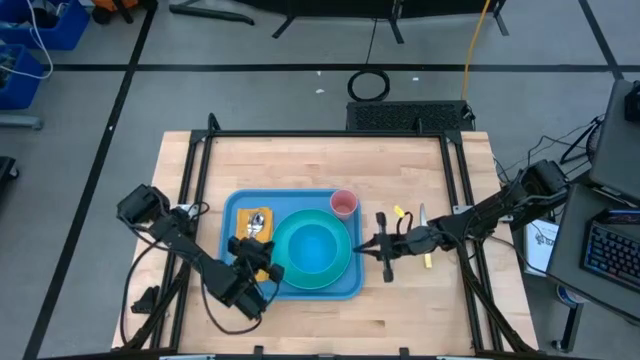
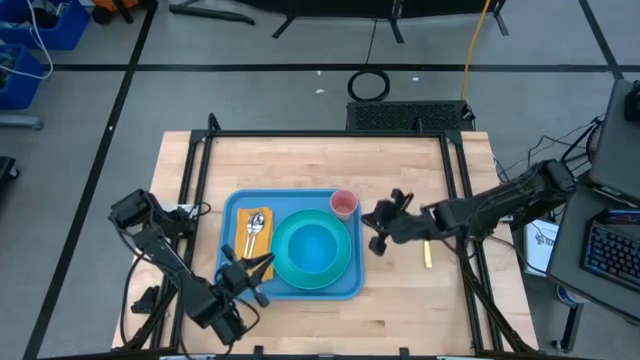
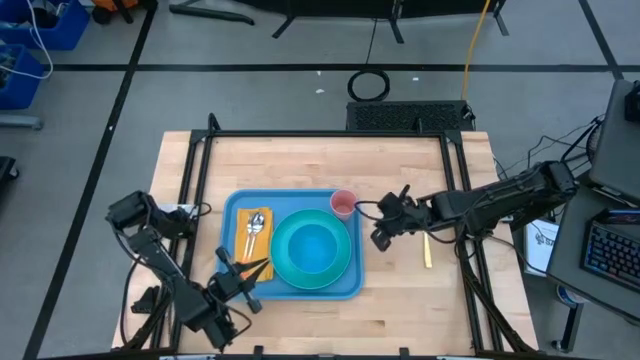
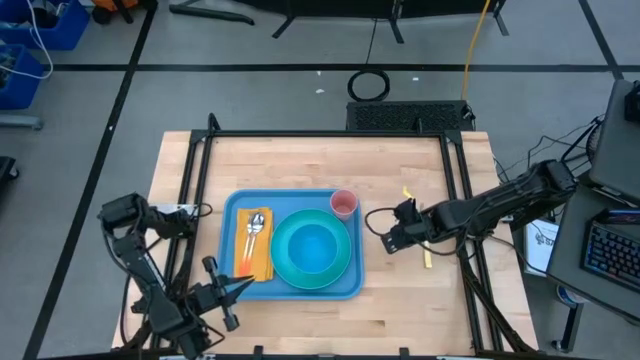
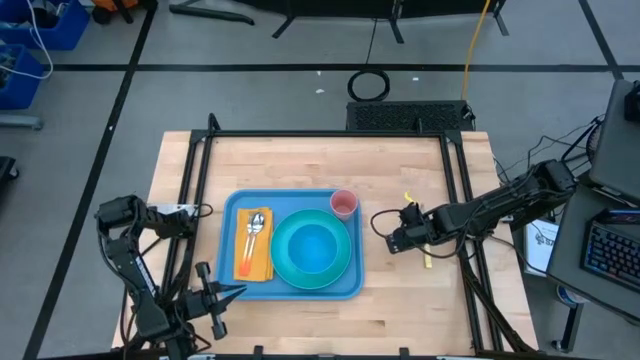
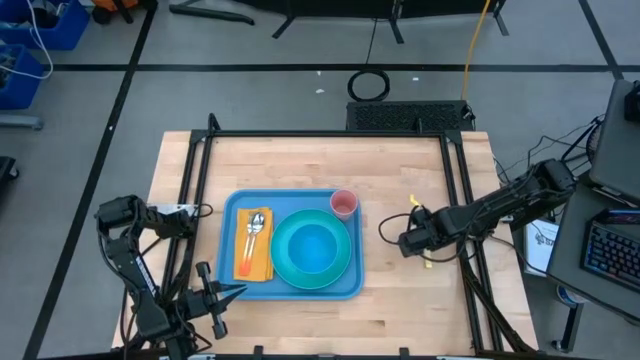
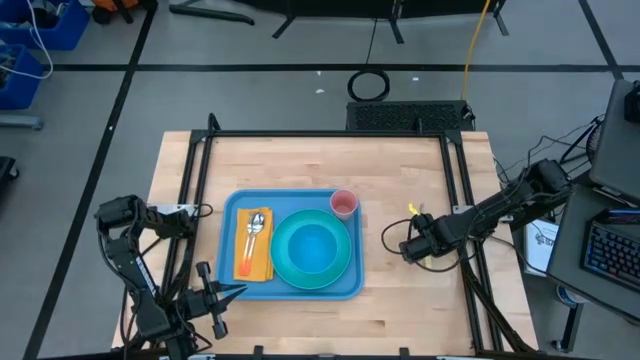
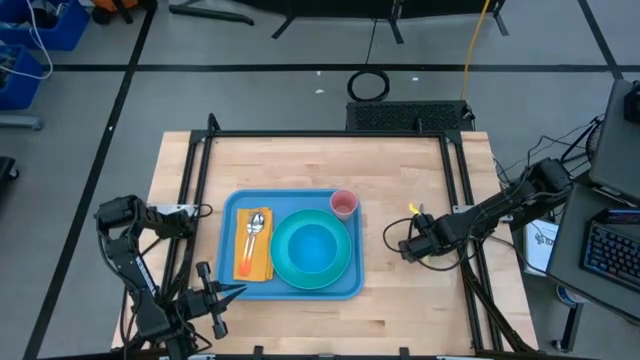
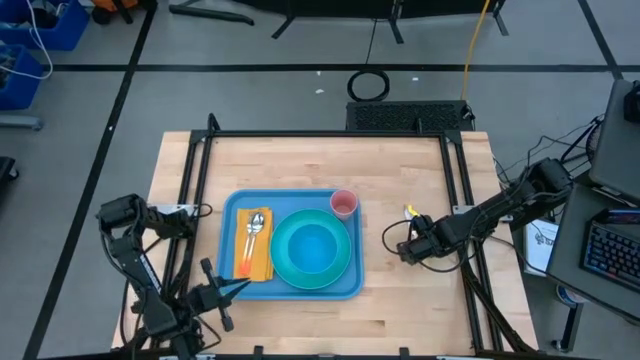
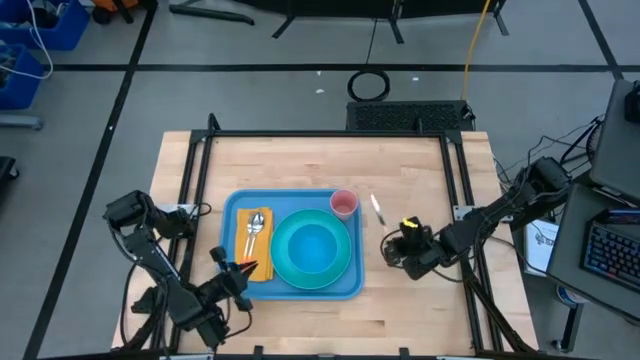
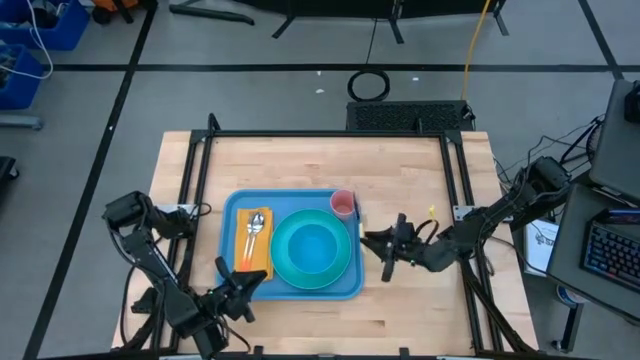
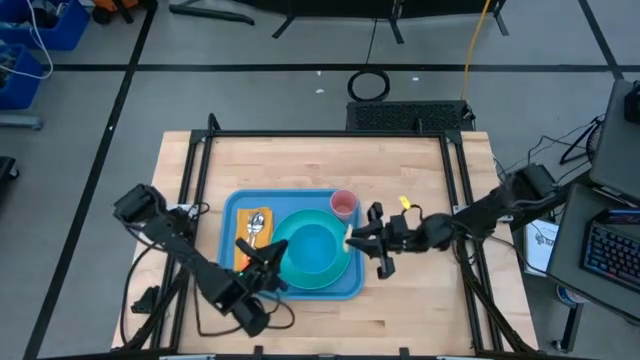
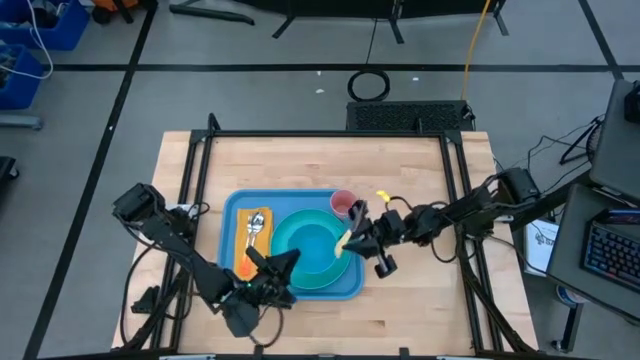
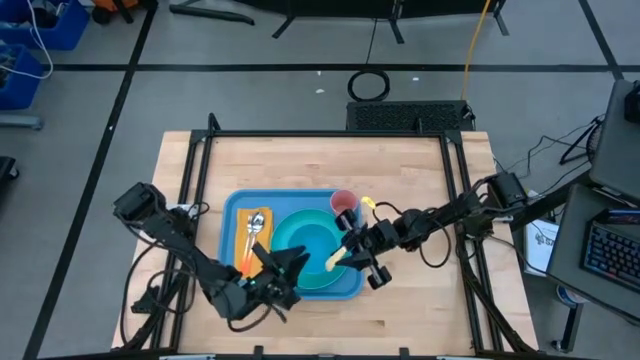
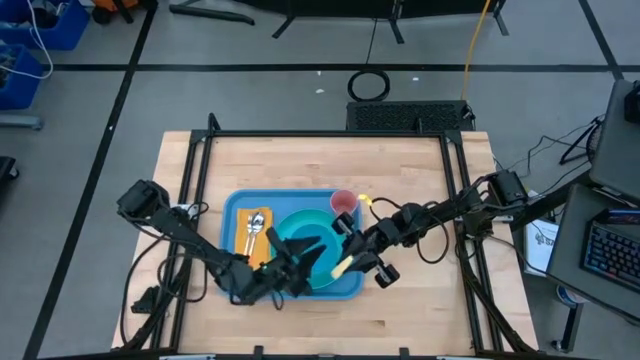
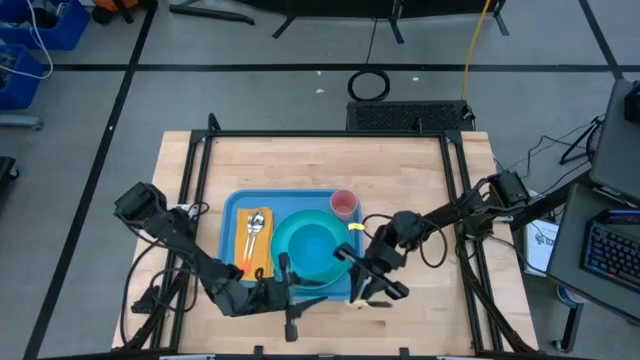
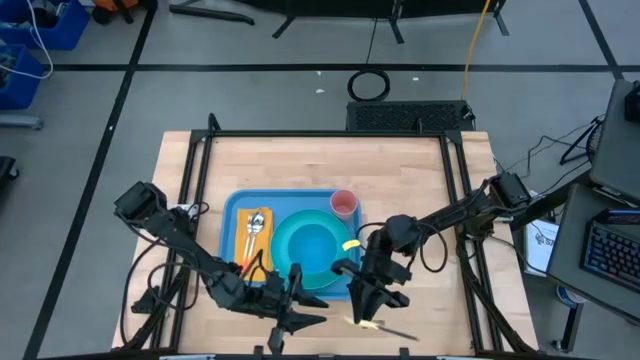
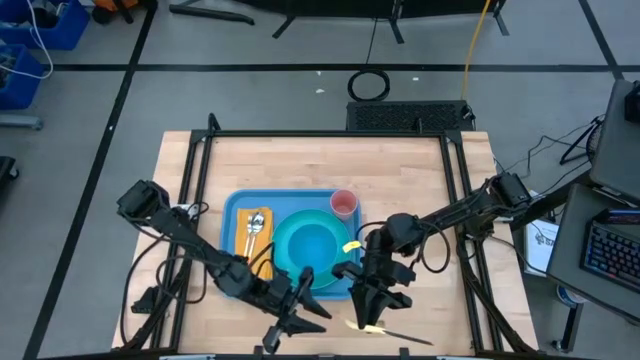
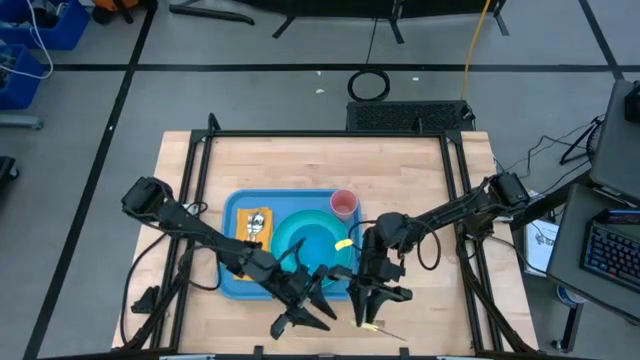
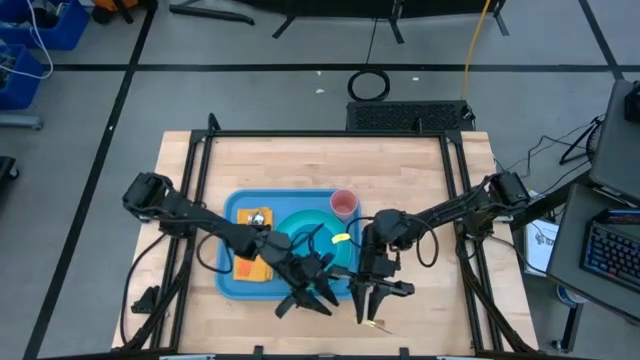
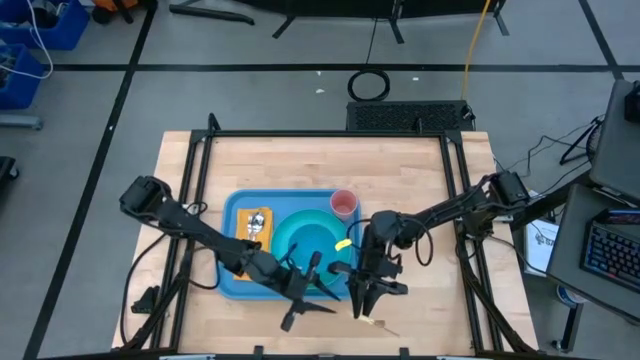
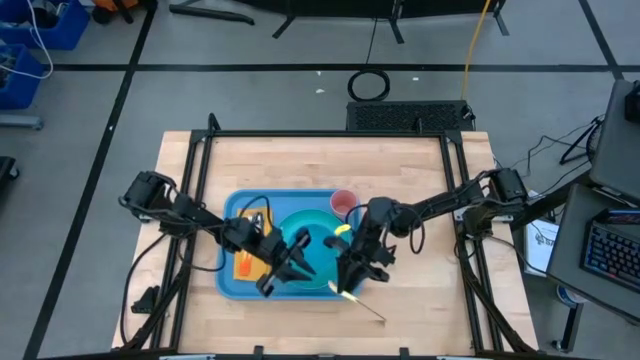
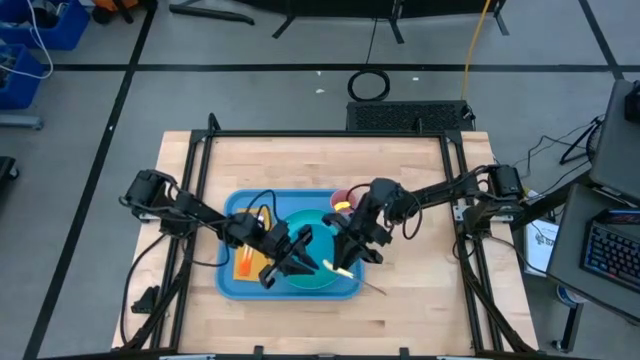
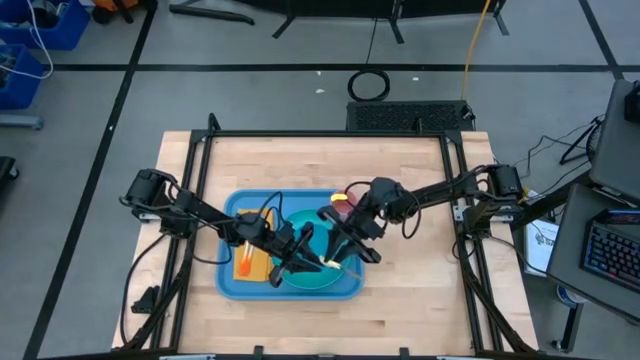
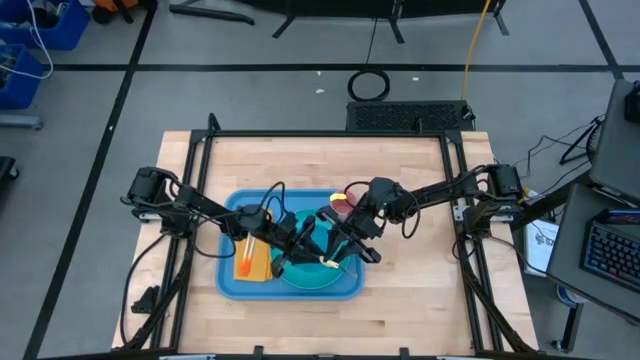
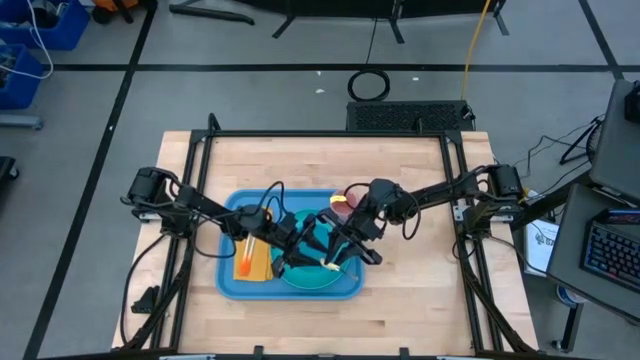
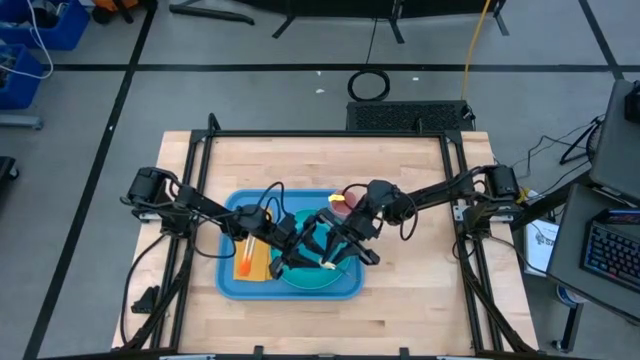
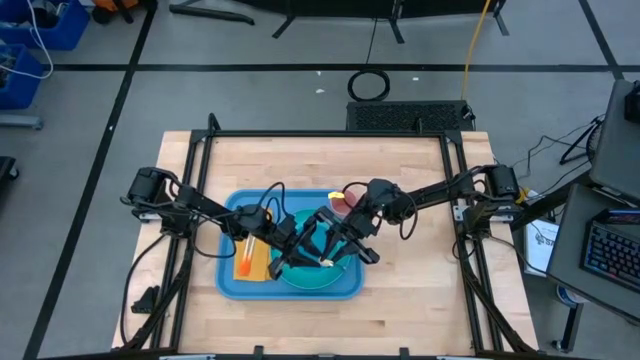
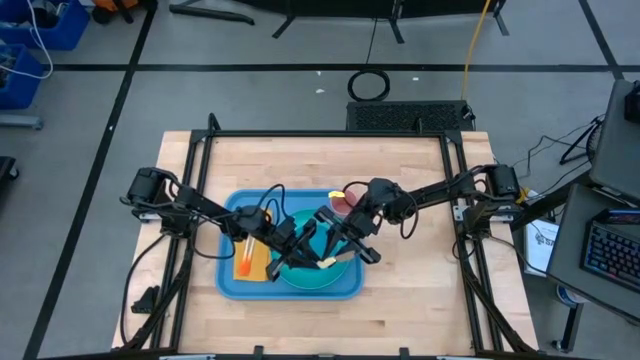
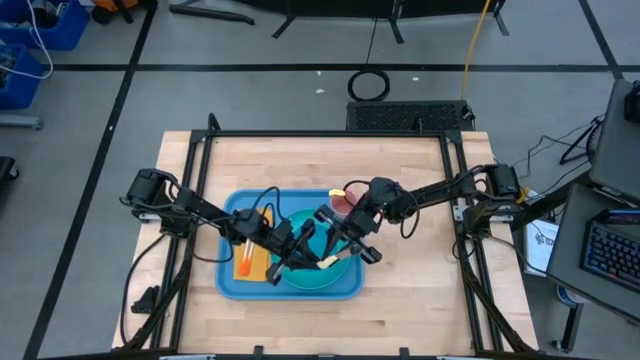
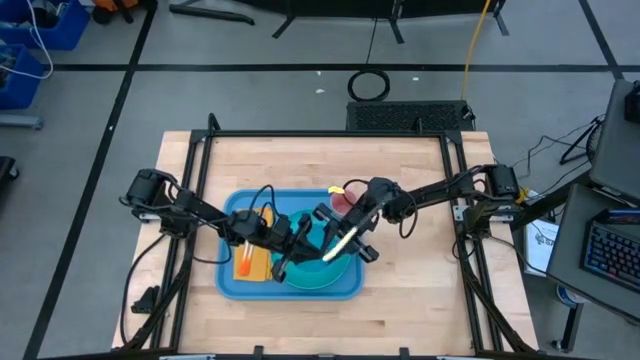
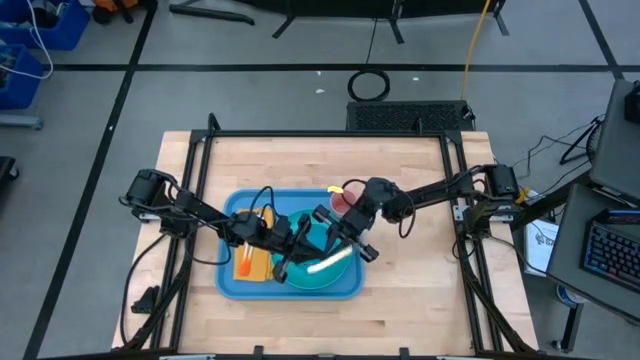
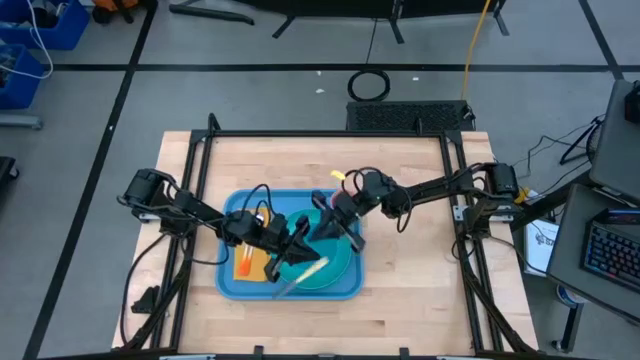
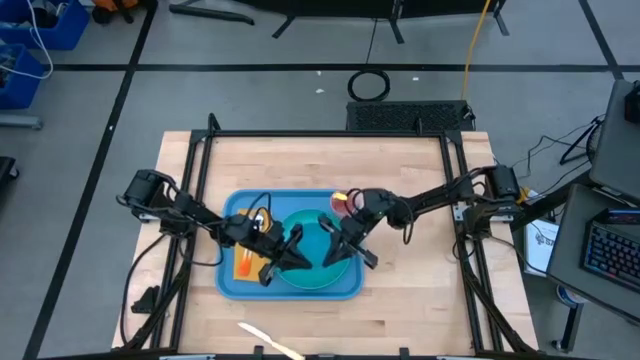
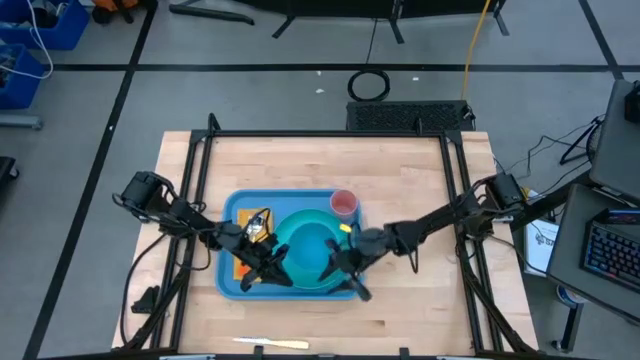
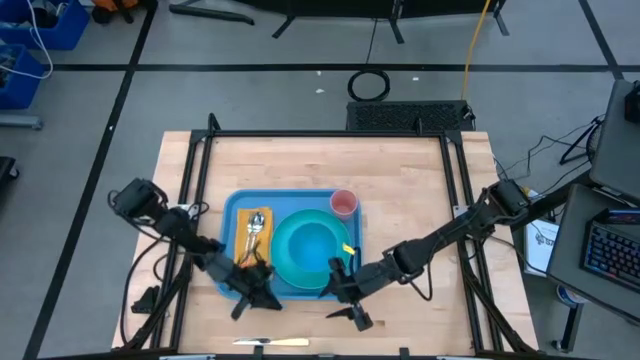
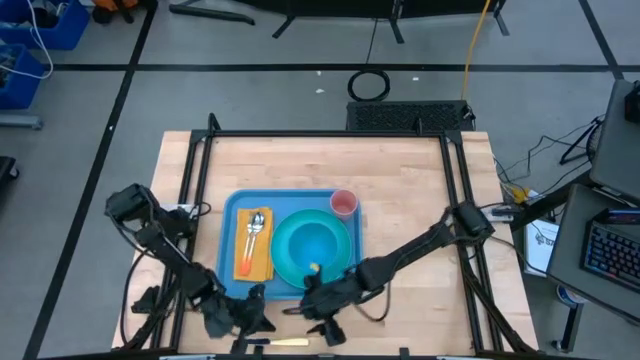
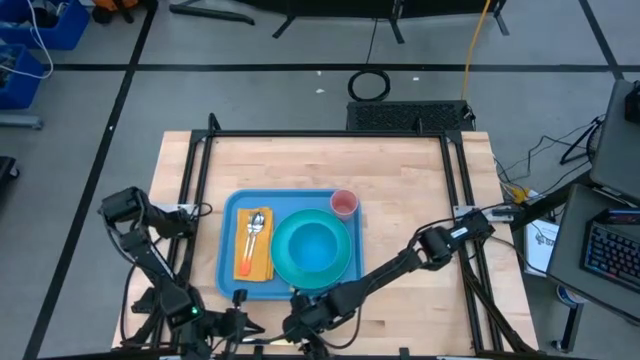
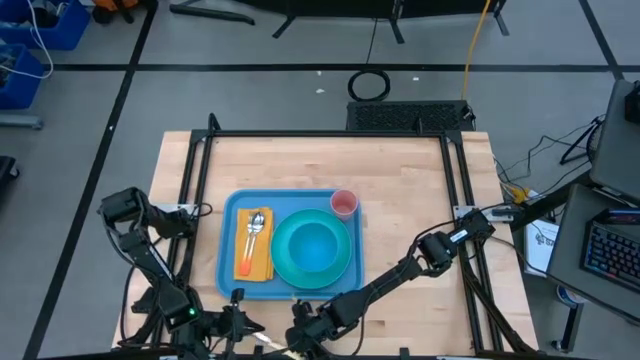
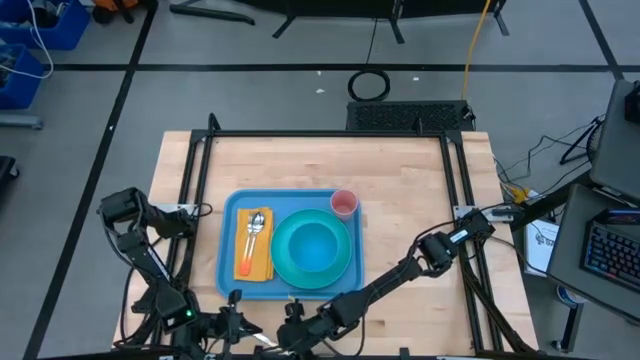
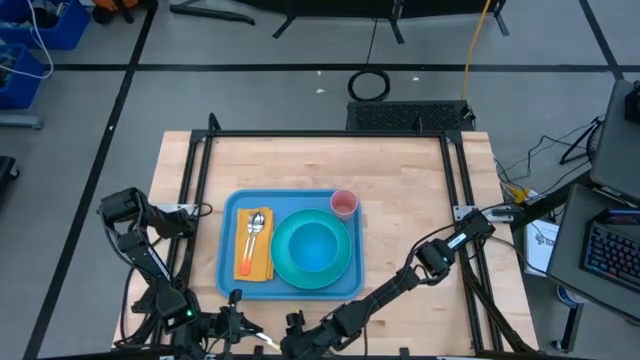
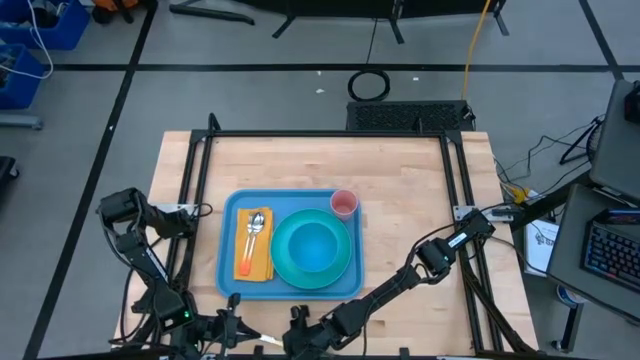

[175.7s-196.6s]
Task: Set up tray
Put the yellow knife on the blue serving tray to the left of the orange spoon
